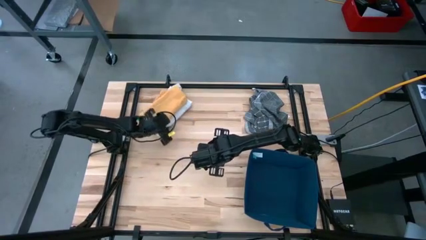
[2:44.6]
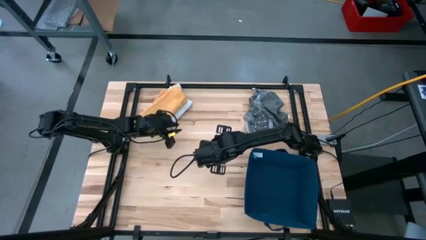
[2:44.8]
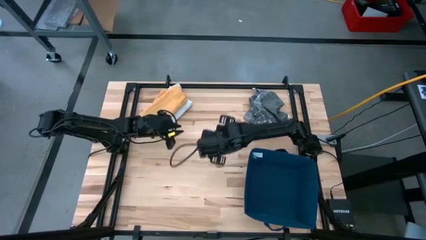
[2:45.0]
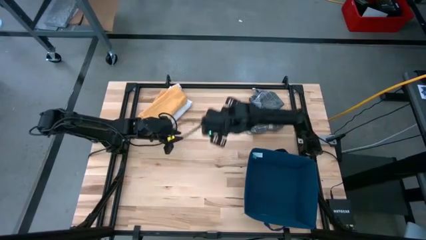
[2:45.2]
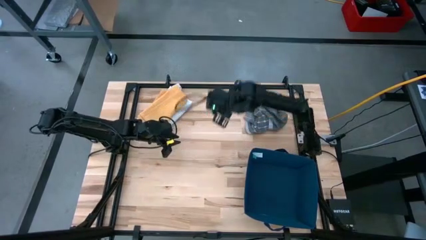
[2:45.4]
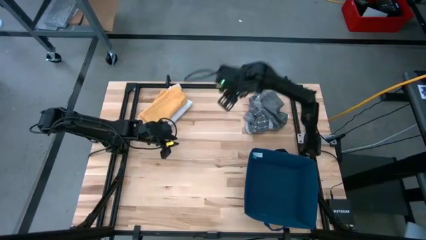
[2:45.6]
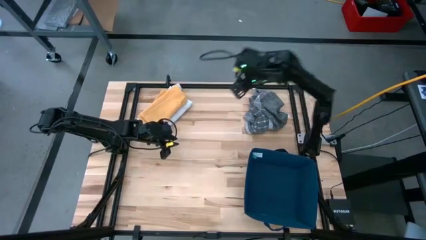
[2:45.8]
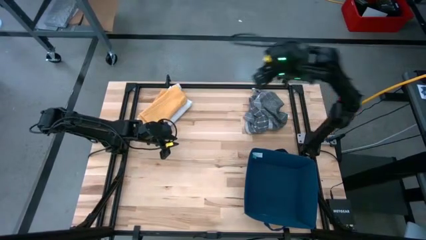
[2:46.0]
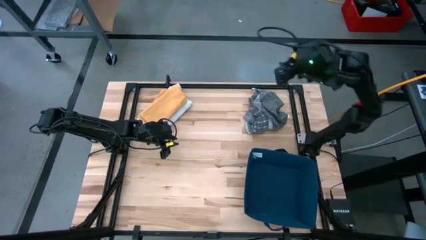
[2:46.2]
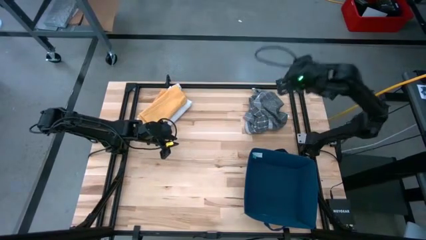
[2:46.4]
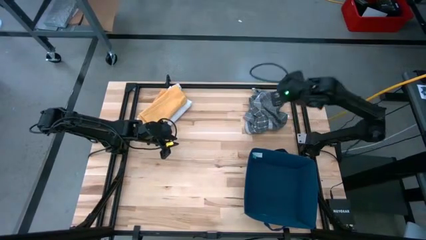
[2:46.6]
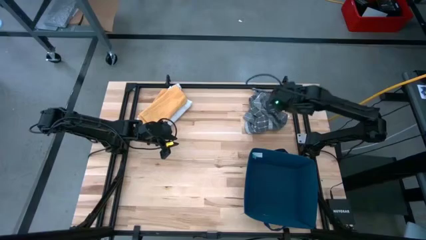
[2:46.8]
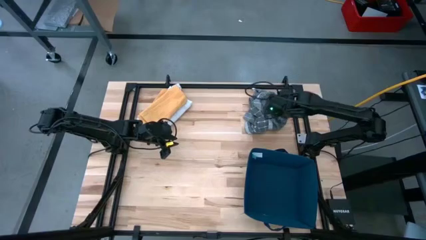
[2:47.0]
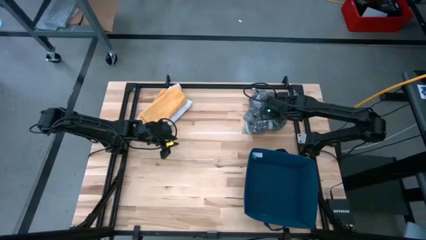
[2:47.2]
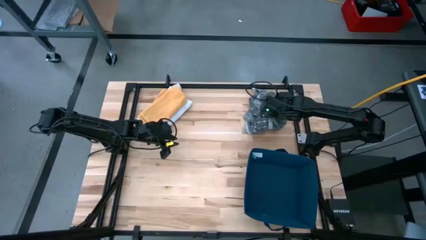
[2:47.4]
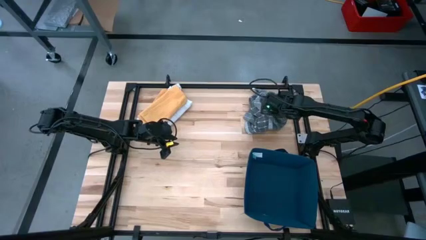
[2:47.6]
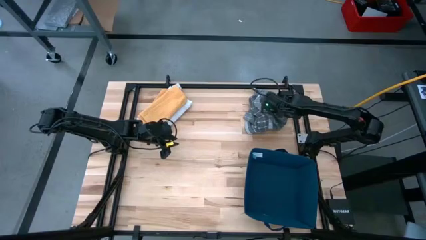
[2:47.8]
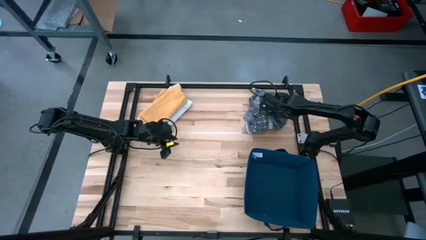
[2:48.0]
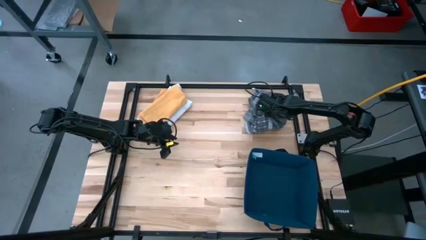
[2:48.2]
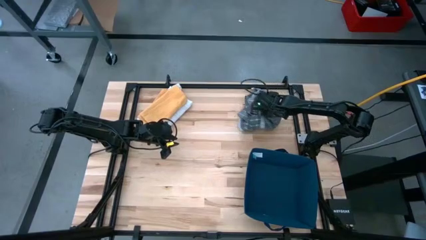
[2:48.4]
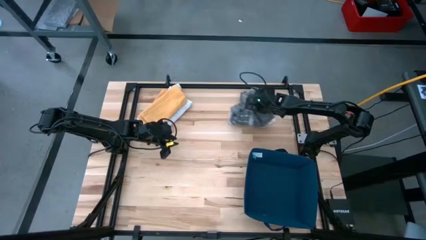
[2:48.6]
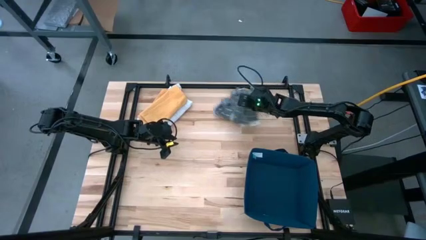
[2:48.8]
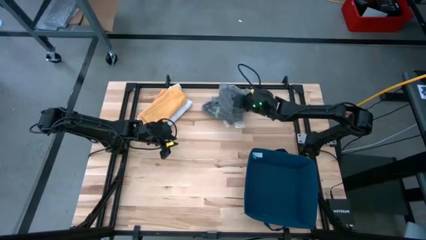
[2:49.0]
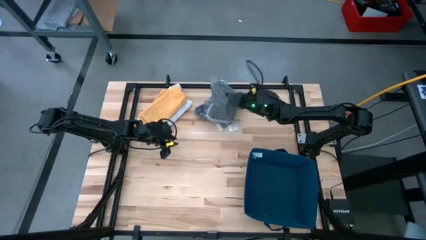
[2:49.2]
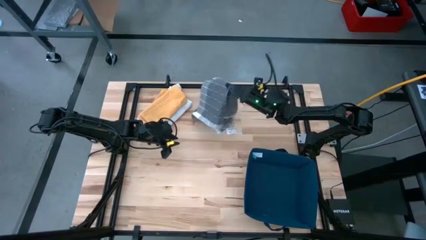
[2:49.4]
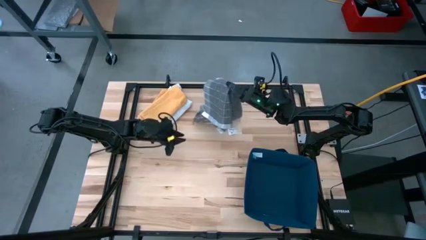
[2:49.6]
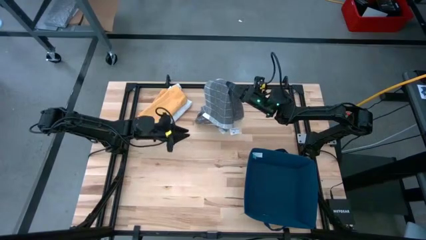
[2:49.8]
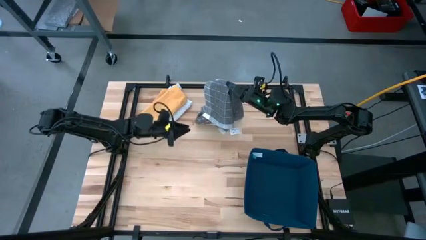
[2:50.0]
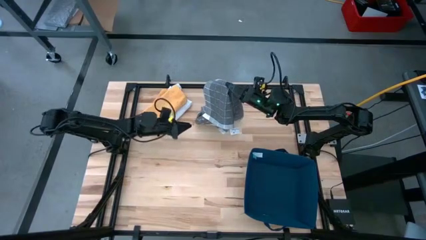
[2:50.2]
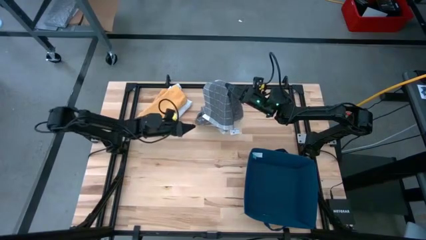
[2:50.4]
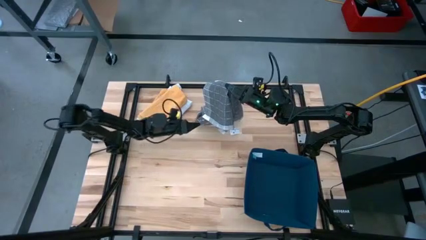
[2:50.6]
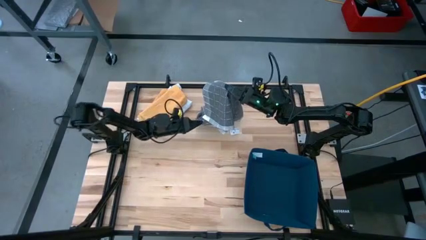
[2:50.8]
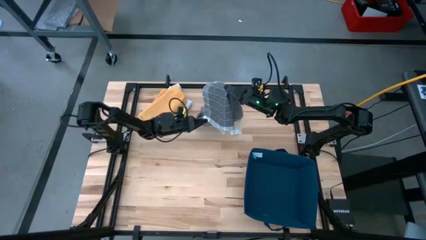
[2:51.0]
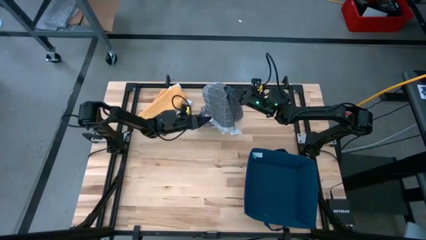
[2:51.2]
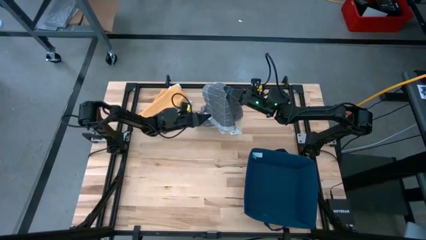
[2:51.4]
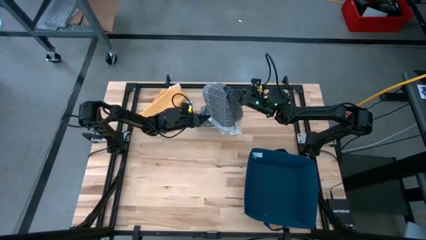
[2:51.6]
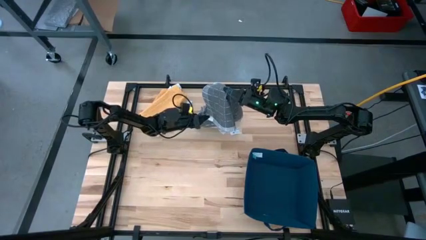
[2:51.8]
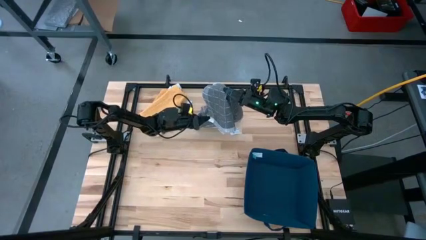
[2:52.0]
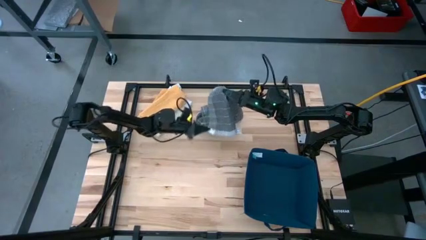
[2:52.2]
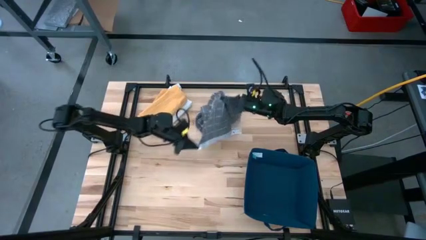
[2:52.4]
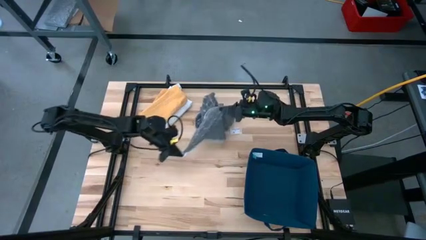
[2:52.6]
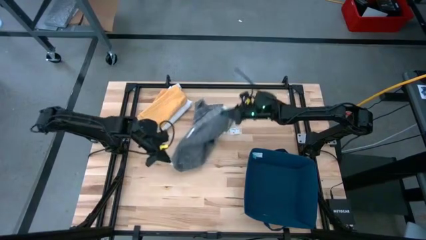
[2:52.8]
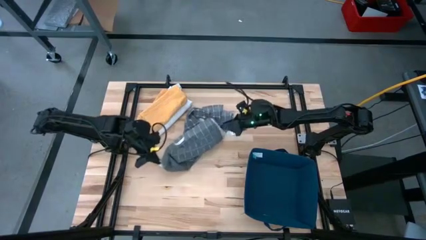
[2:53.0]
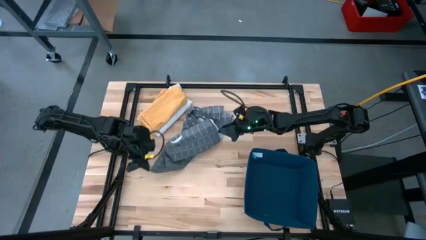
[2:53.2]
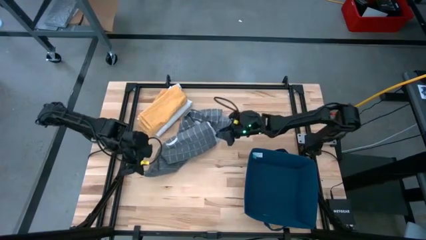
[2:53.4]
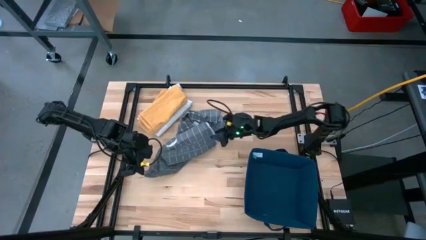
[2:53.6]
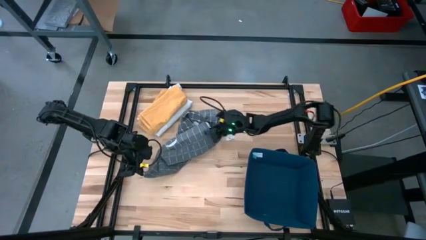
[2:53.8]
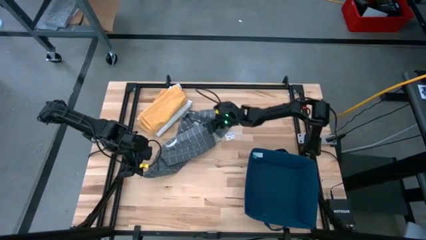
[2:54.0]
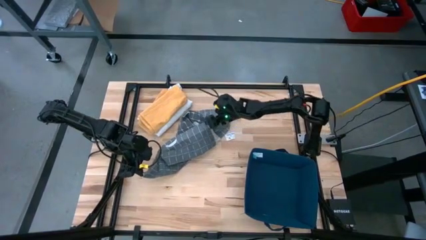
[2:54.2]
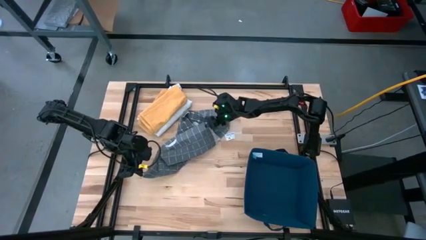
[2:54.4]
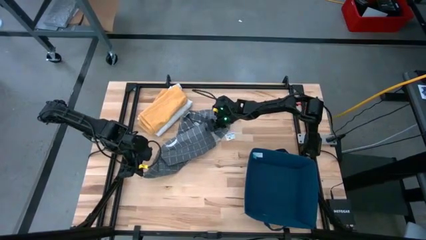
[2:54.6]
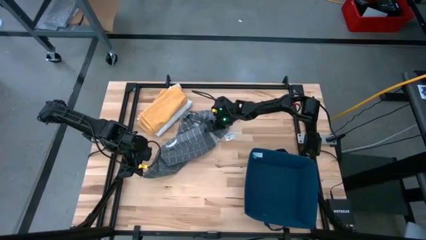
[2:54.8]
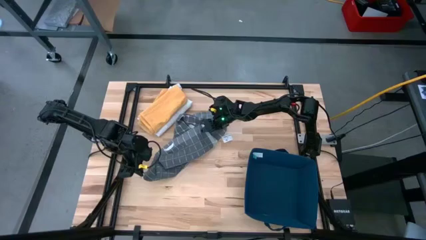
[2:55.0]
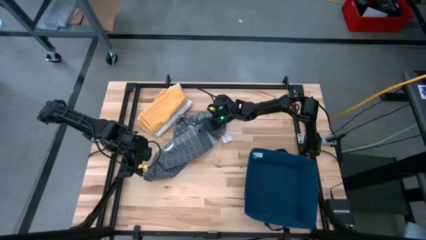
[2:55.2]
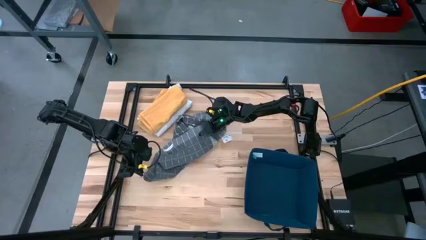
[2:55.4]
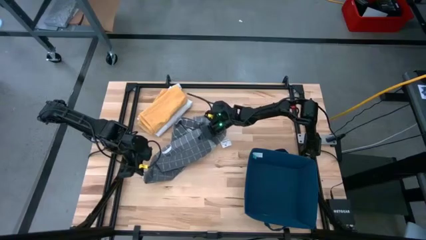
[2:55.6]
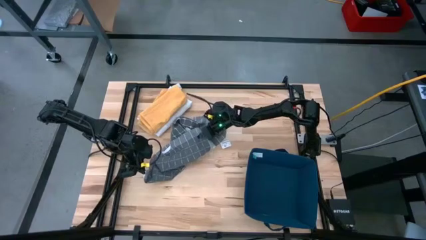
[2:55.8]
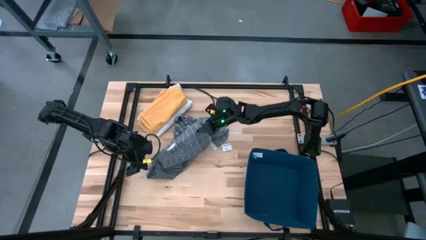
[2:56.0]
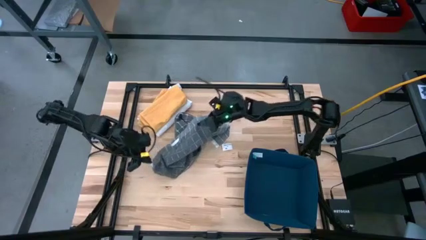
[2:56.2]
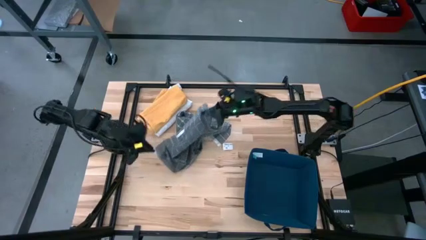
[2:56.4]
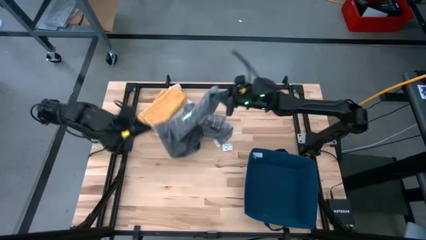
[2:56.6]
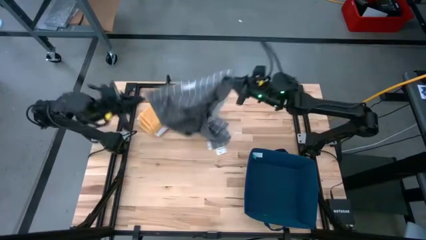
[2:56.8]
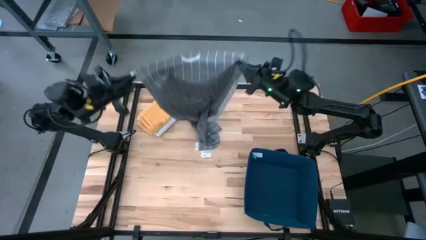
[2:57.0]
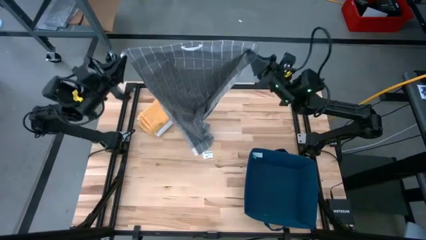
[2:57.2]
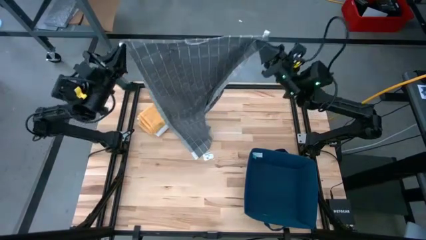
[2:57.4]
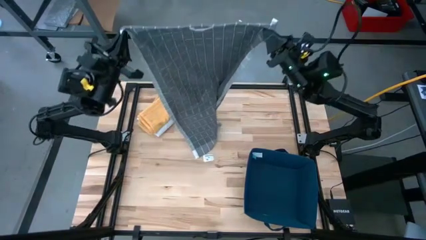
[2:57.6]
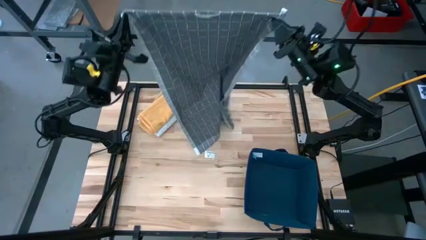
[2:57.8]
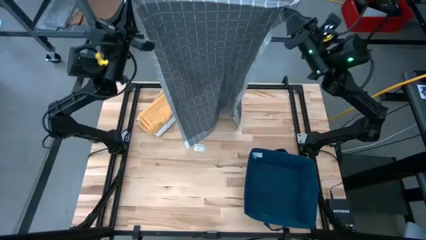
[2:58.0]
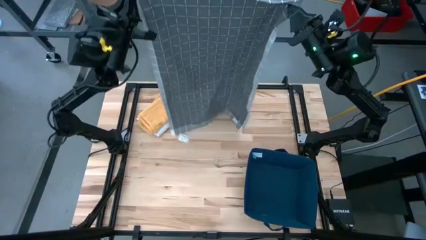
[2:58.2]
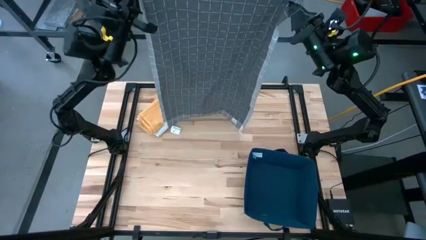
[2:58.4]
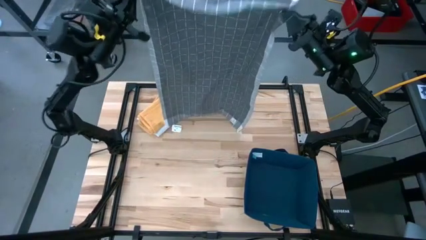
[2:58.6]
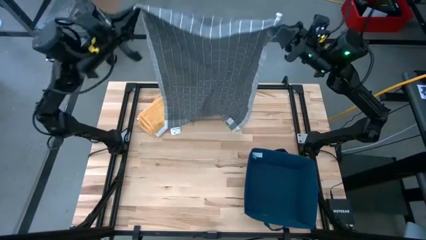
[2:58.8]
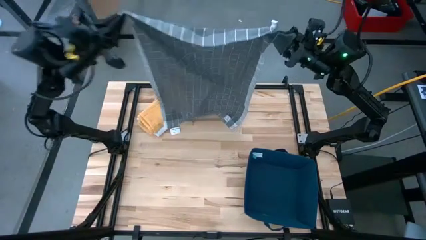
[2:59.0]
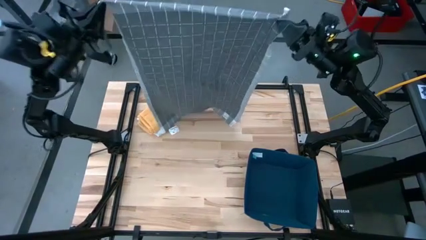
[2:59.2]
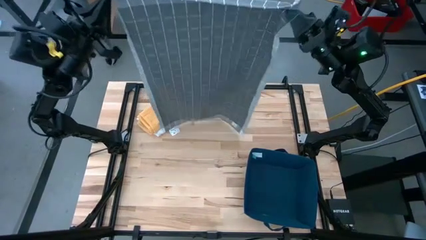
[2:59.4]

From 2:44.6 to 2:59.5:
Task: Fold towel
Fold the gray towel
